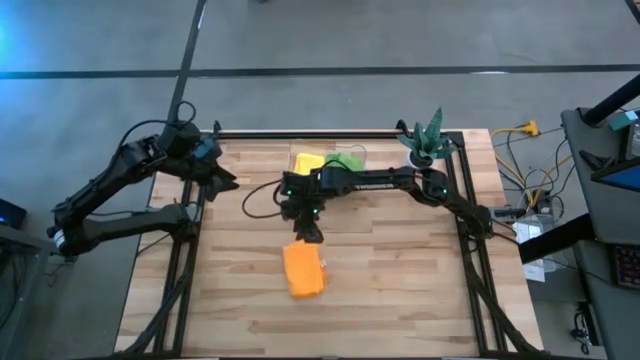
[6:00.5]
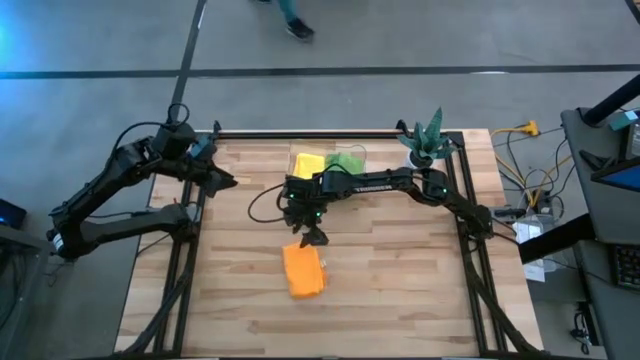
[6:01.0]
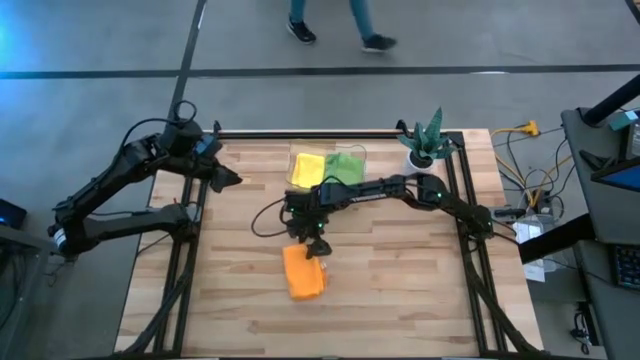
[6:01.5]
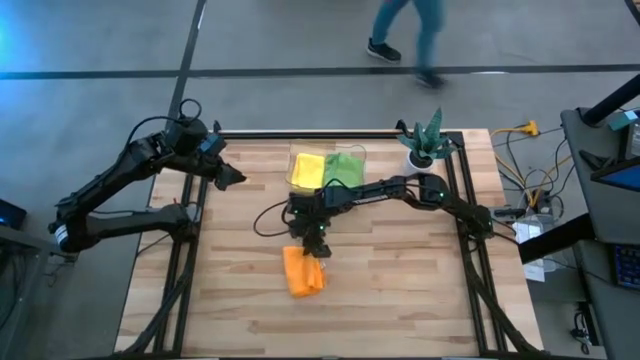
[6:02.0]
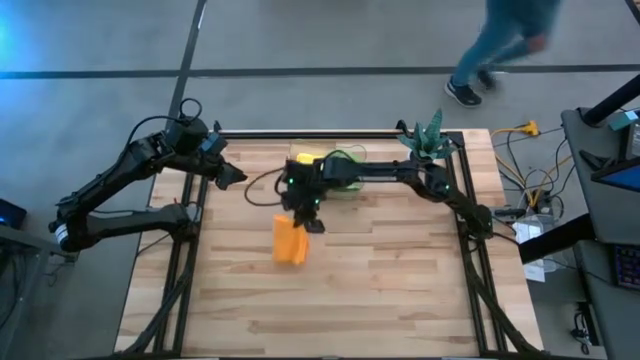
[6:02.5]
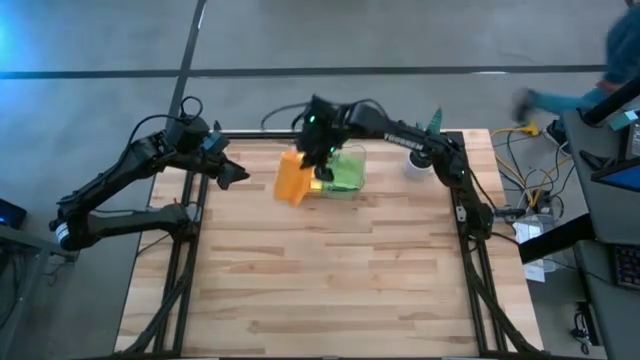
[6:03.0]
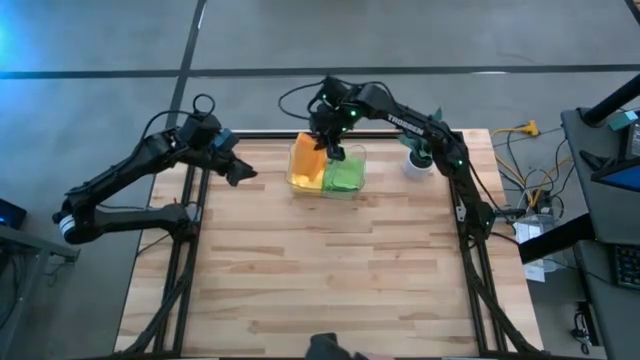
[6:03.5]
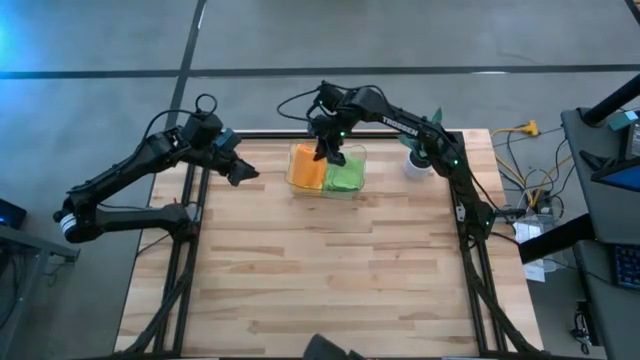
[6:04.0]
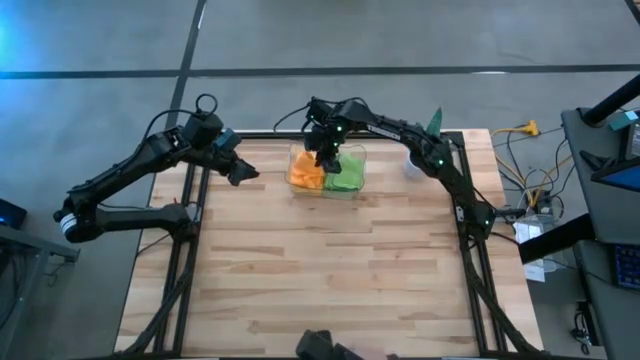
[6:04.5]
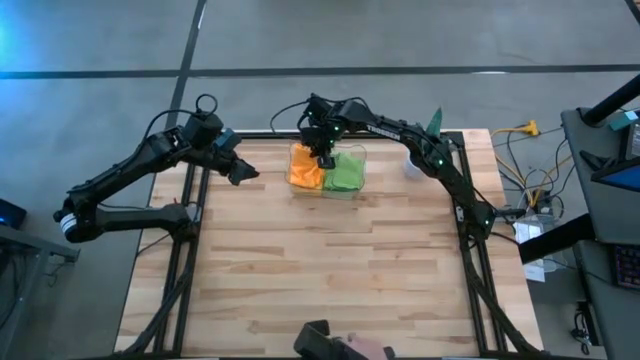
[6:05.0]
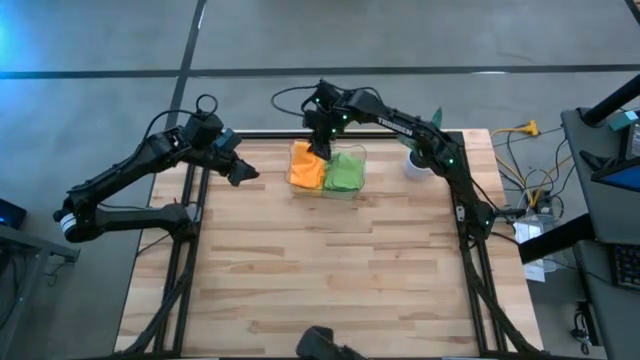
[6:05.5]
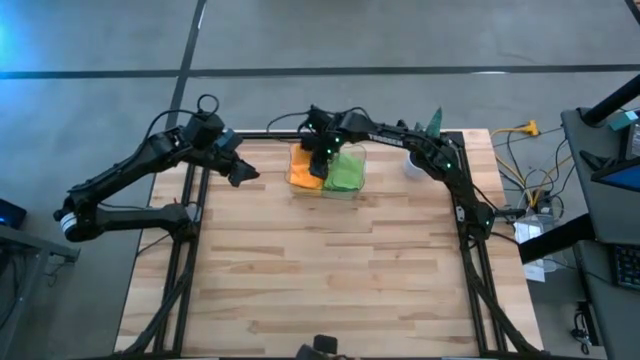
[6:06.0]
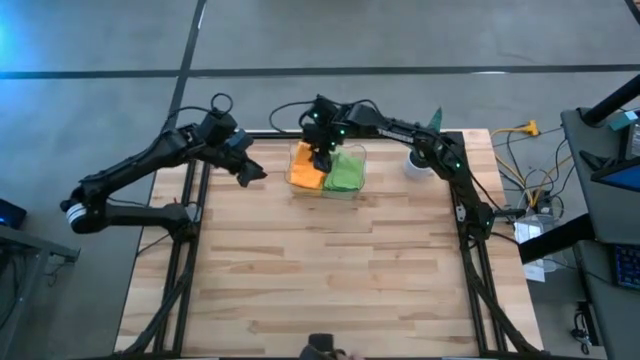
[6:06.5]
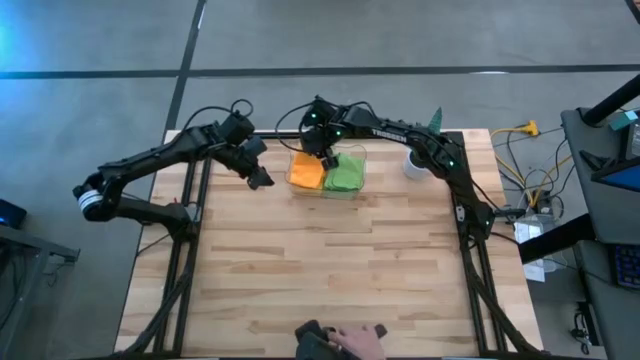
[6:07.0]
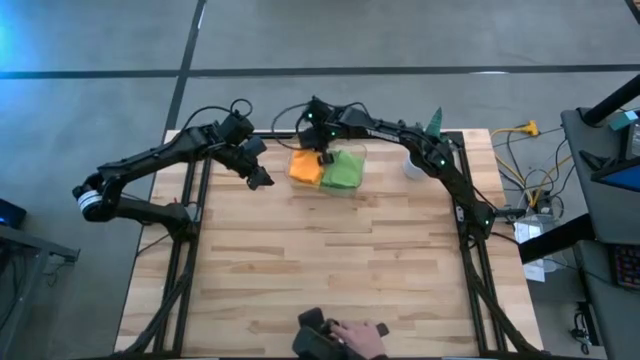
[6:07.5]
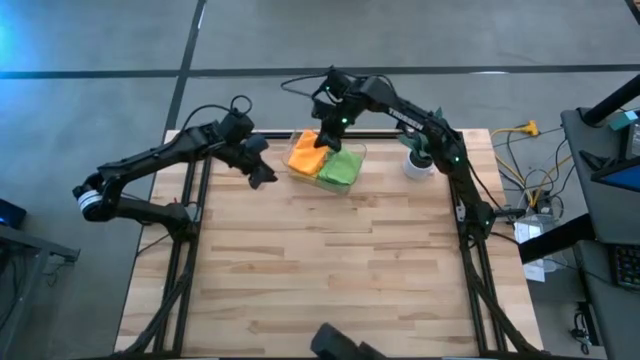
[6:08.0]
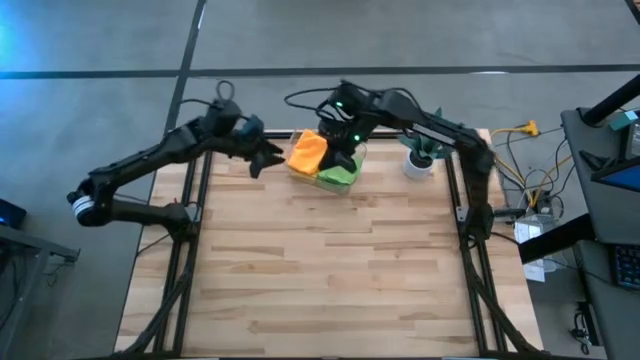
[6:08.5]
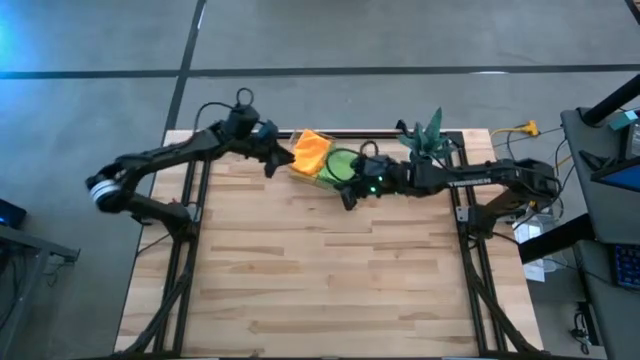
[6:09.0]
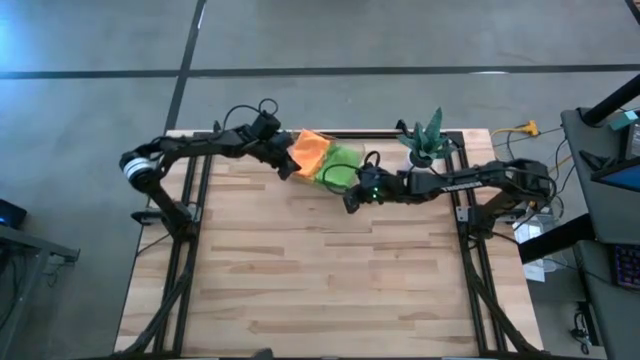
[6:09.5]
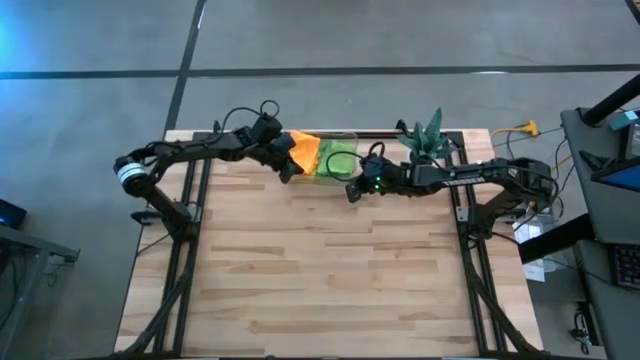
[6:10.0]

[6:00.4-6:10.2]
Task: Fold microfiber towels
Put the folded orange microfiber towel into the transparent bin

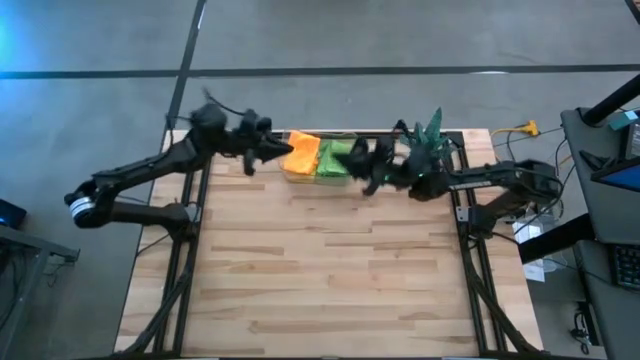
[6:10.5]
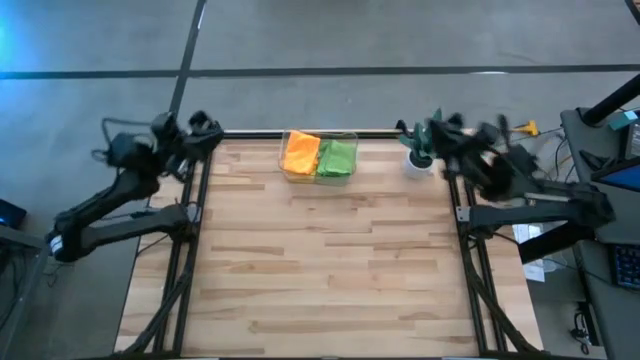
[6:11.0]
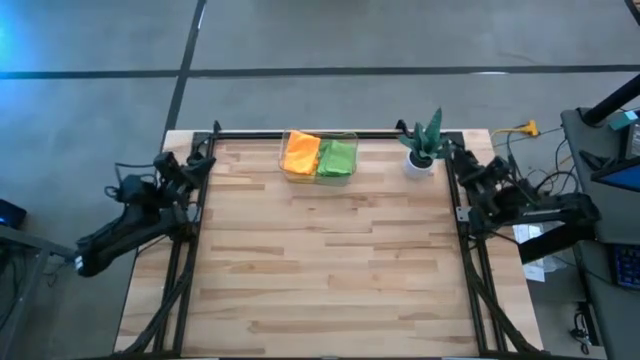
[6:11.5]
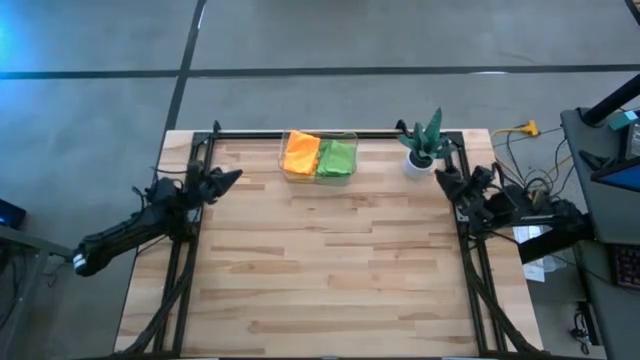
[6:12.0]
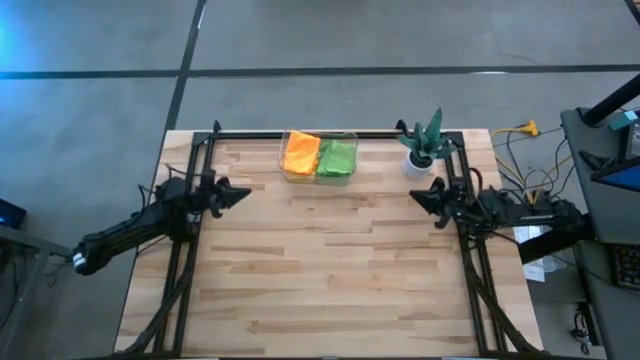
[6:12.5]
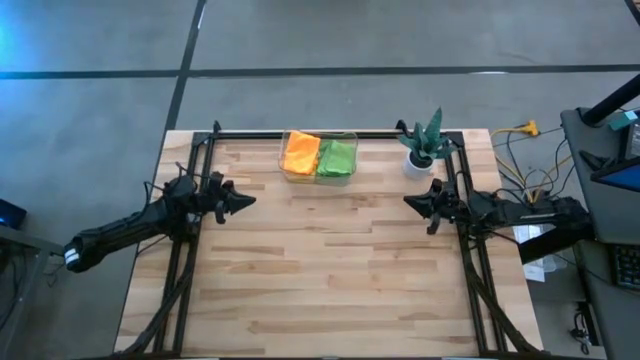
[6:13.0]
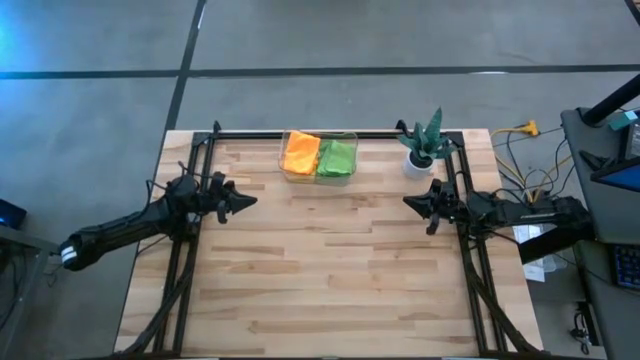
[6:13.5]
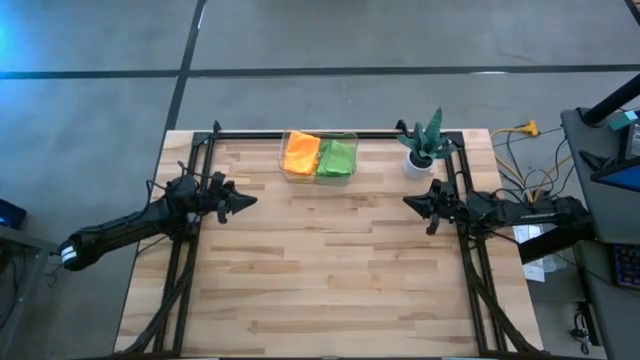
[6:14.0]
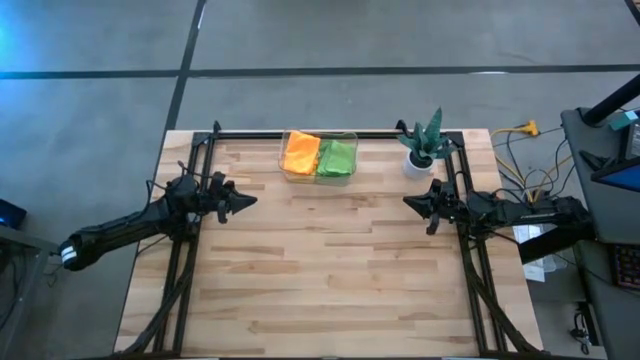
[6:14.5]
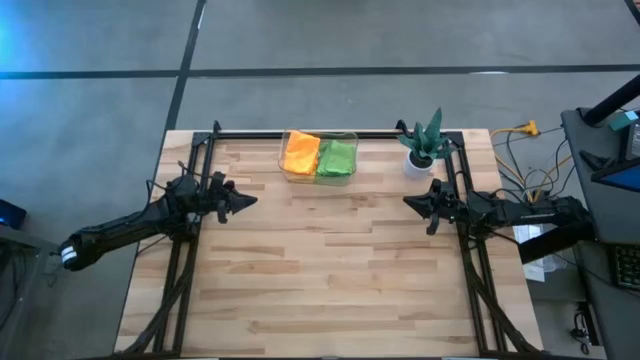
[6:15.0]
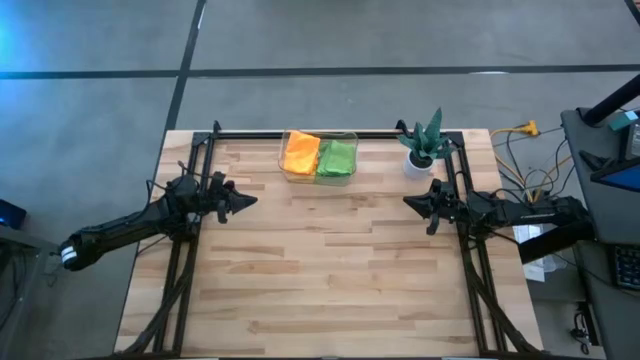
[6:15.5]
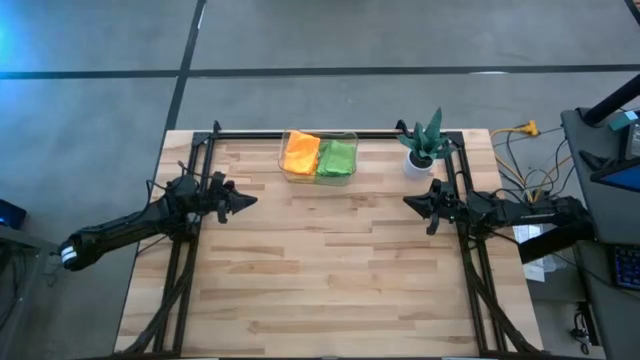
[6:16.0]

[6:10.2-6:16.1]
Return to Home Position

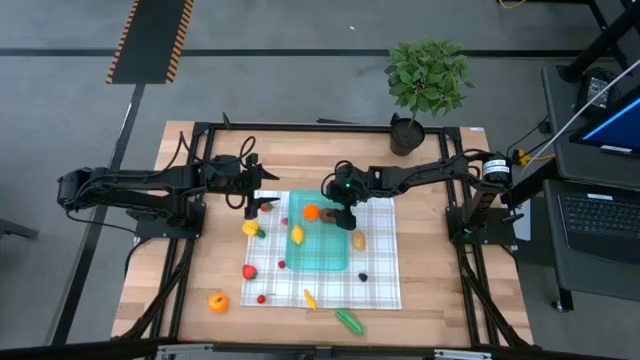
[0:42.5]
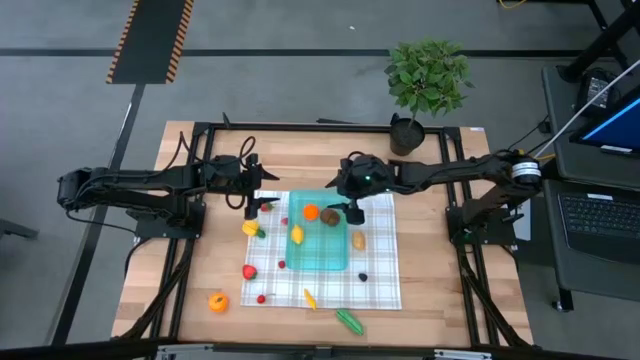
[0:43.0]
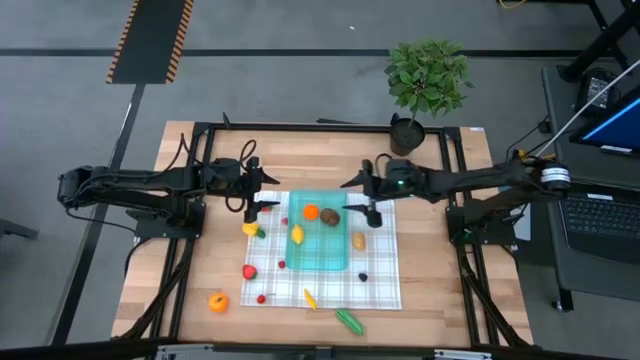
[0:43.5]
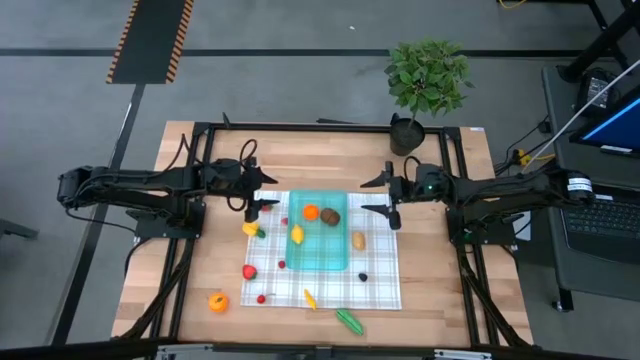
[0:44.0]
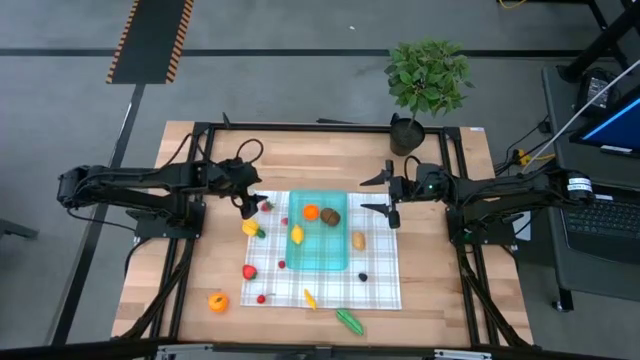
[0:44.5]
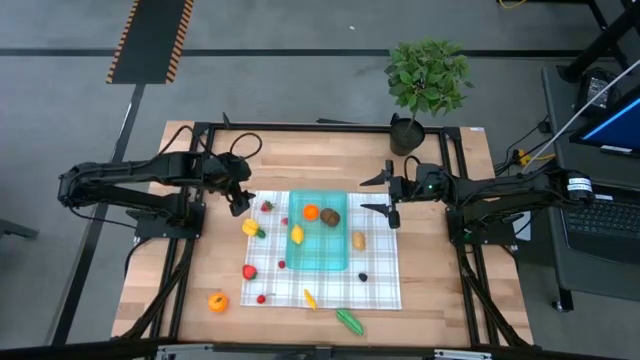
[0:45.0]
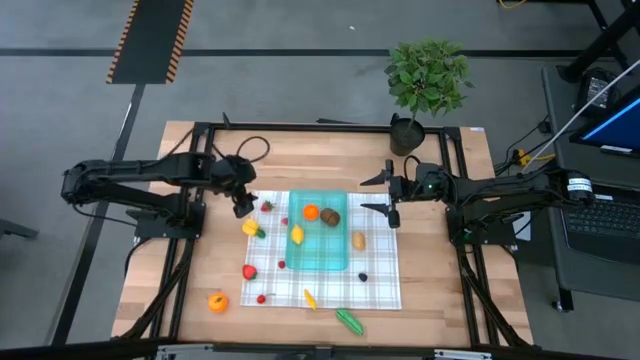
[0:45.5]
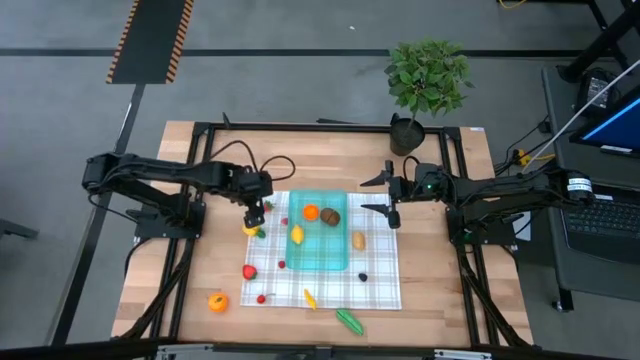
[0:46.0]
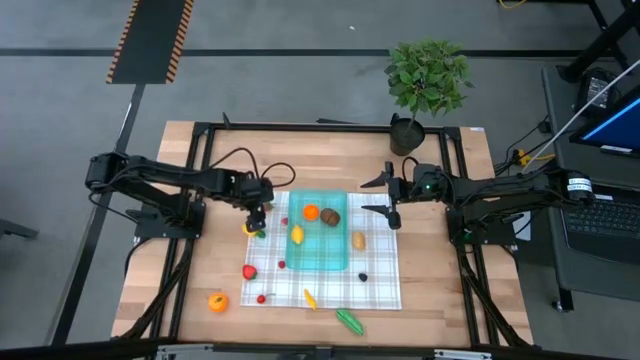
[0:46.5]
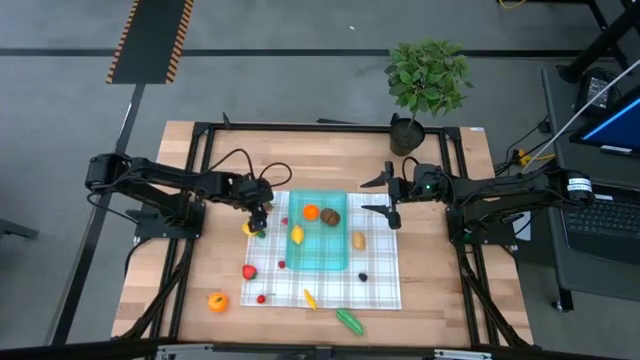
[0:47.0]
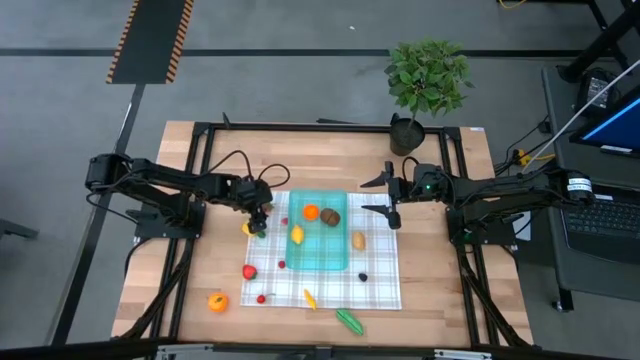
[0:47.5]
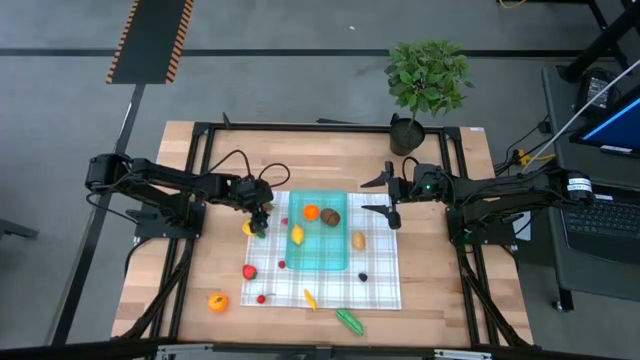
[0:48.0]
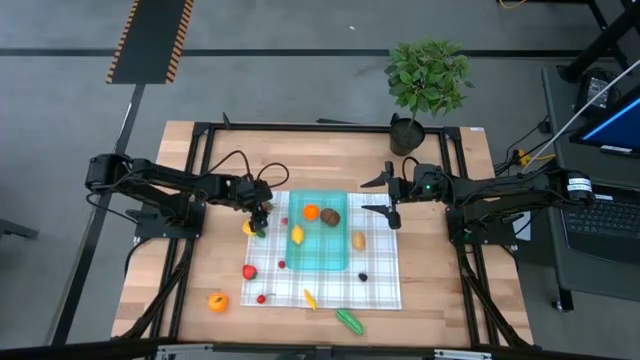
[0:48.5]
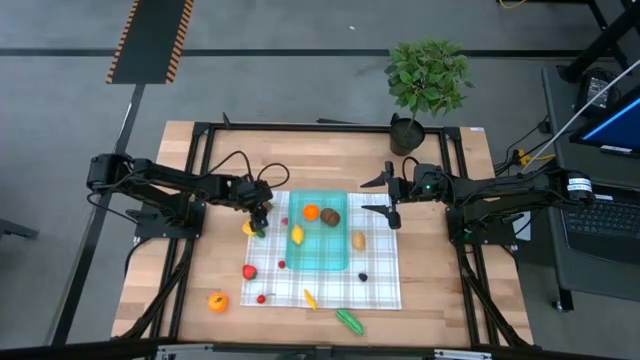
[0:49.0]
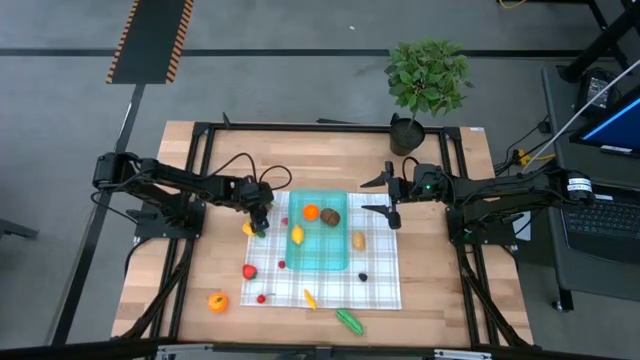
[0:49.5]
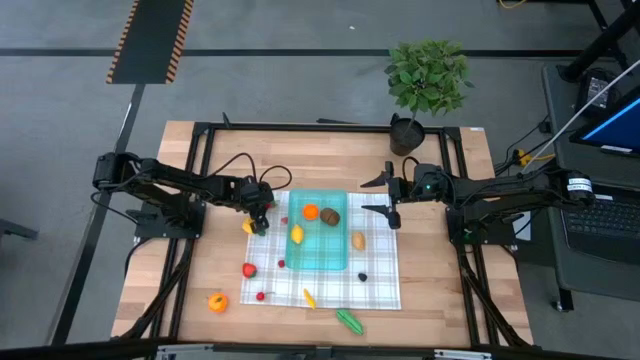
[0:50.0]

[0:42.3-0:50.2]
Task: Pick and placing Produce into tupperware
Put the top red strawberry into the blue bin
